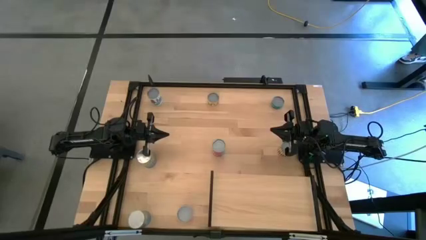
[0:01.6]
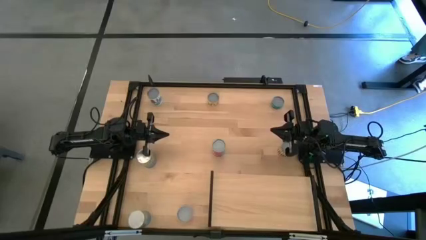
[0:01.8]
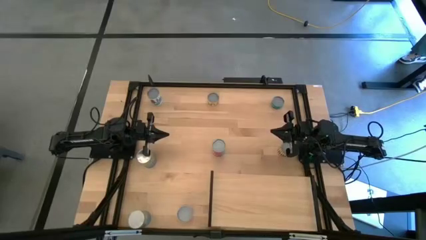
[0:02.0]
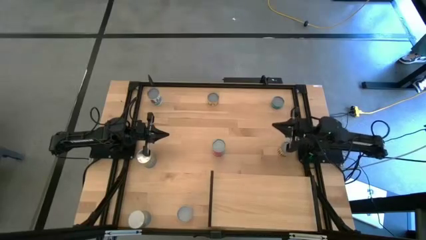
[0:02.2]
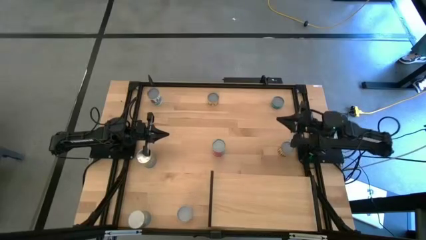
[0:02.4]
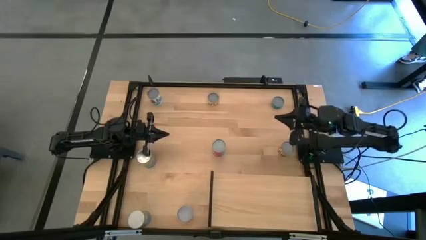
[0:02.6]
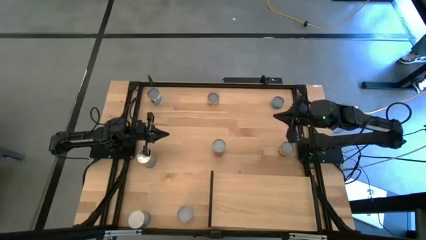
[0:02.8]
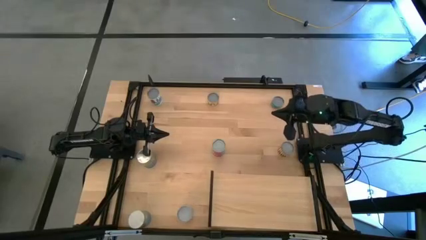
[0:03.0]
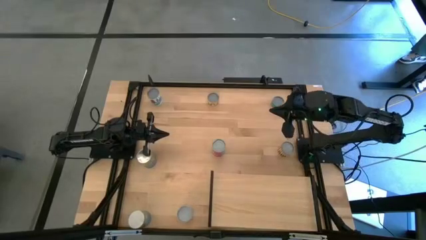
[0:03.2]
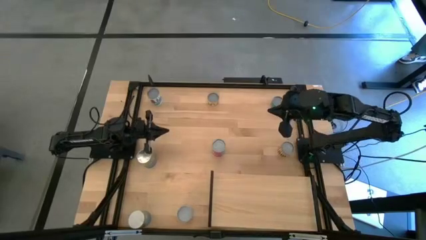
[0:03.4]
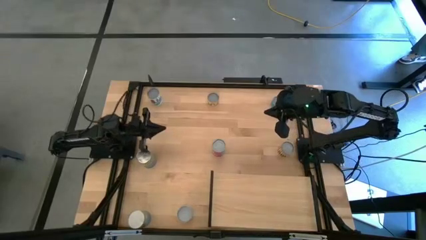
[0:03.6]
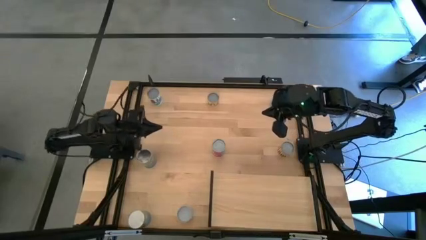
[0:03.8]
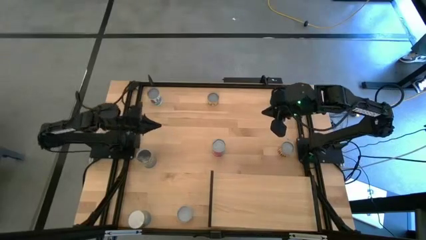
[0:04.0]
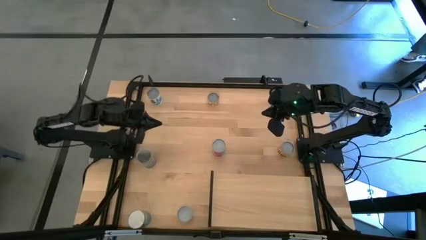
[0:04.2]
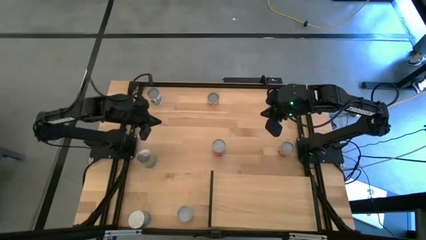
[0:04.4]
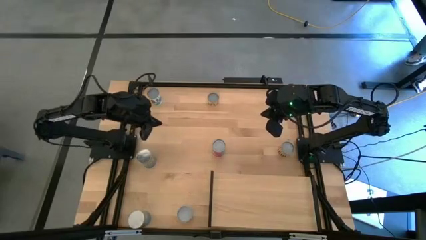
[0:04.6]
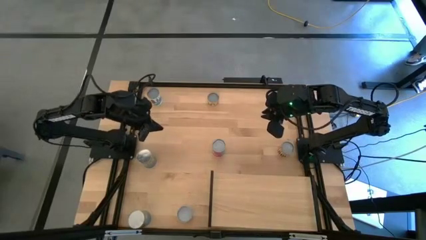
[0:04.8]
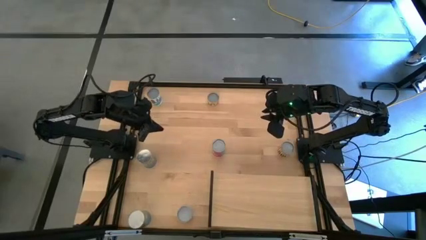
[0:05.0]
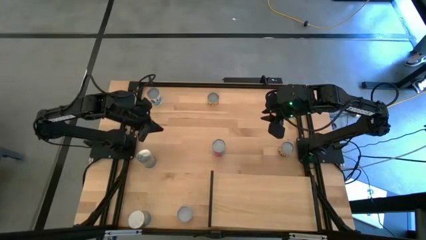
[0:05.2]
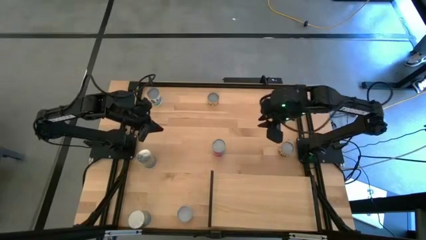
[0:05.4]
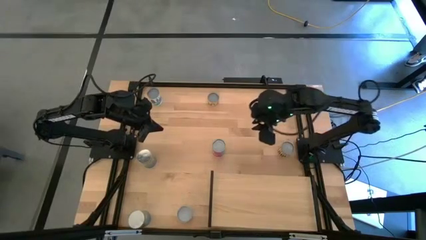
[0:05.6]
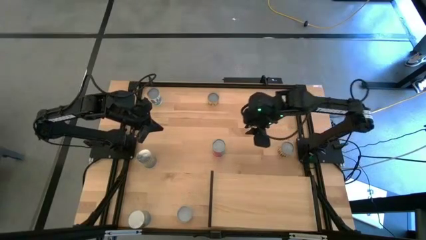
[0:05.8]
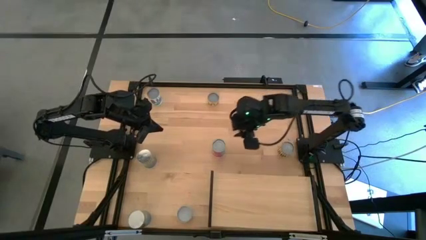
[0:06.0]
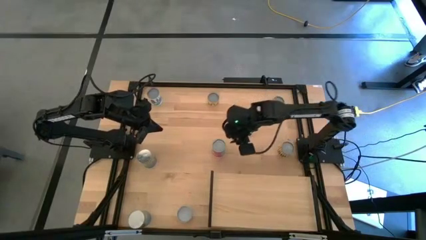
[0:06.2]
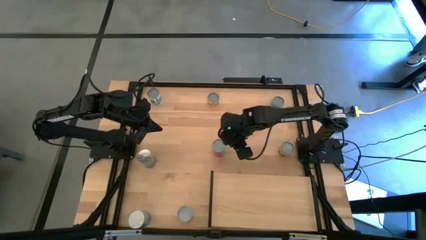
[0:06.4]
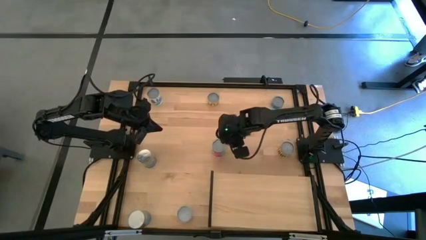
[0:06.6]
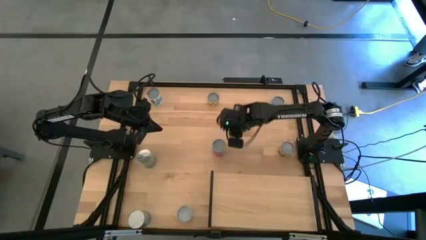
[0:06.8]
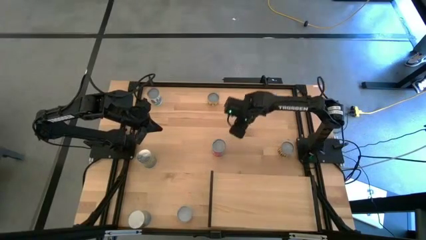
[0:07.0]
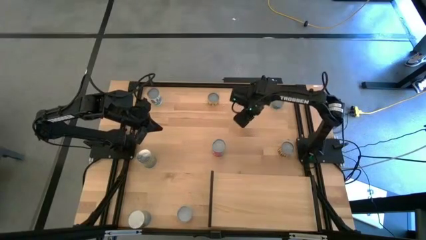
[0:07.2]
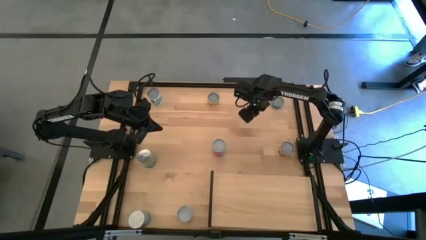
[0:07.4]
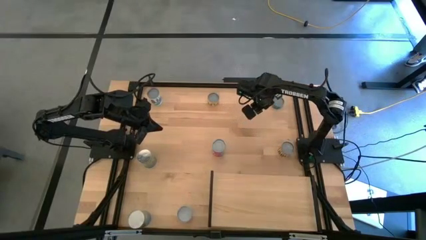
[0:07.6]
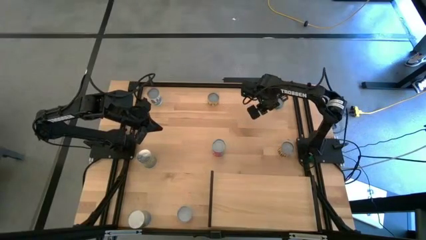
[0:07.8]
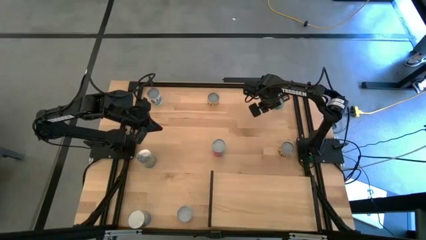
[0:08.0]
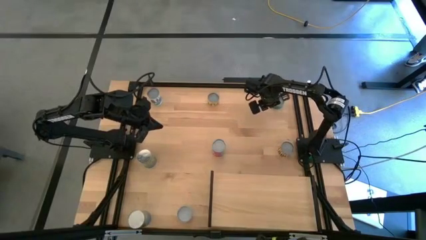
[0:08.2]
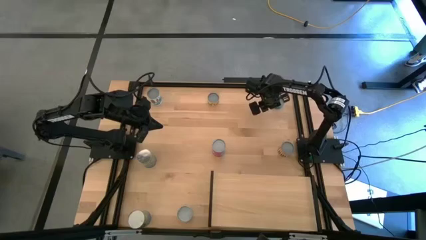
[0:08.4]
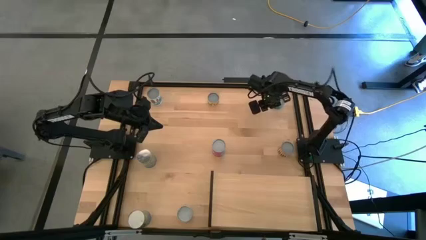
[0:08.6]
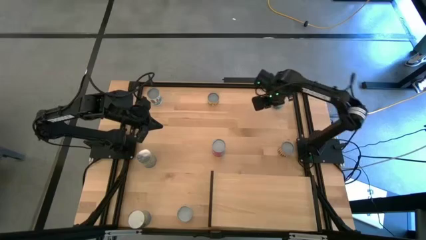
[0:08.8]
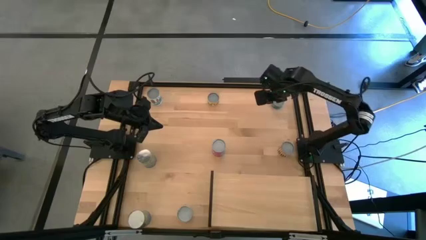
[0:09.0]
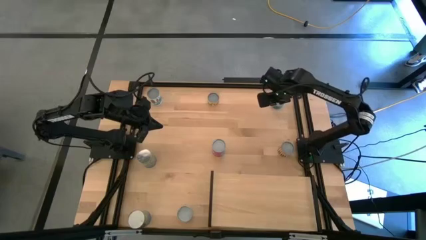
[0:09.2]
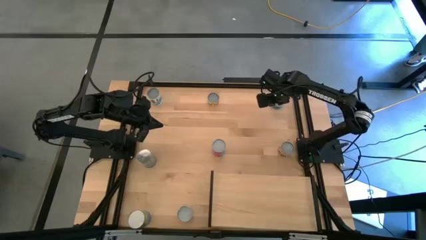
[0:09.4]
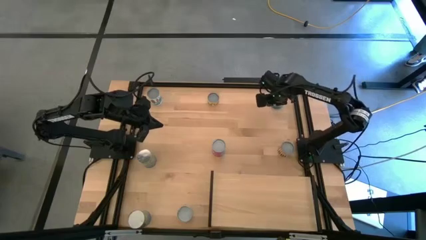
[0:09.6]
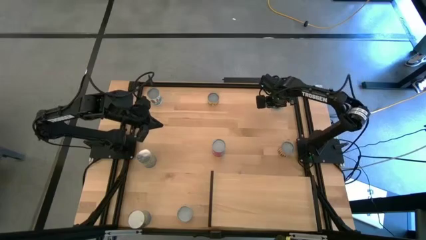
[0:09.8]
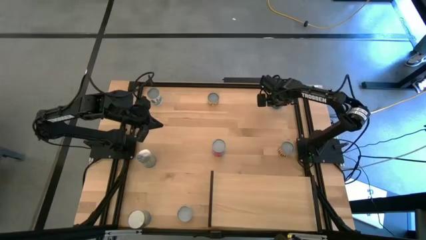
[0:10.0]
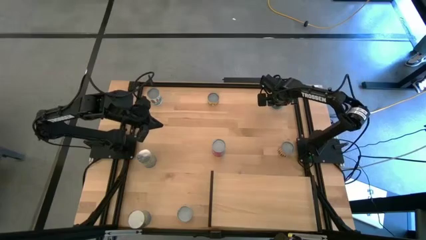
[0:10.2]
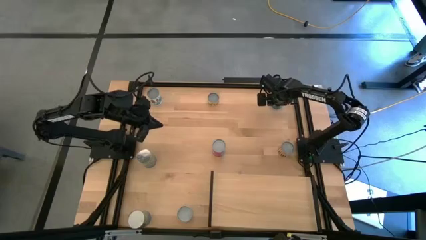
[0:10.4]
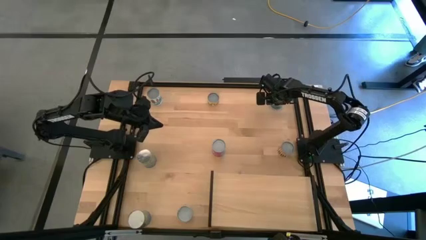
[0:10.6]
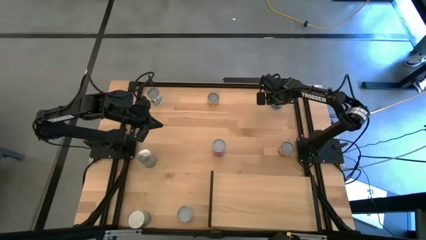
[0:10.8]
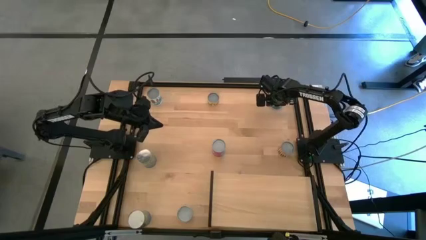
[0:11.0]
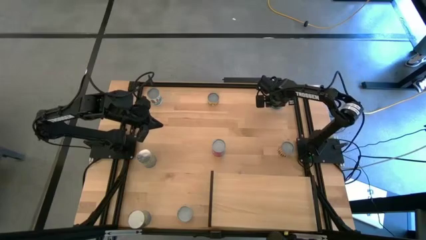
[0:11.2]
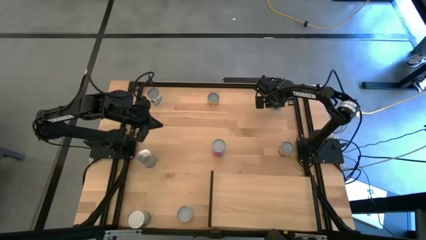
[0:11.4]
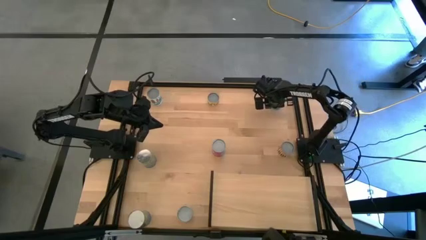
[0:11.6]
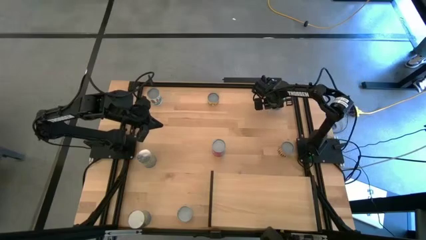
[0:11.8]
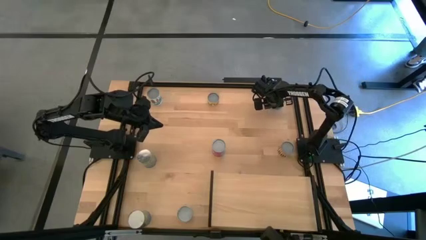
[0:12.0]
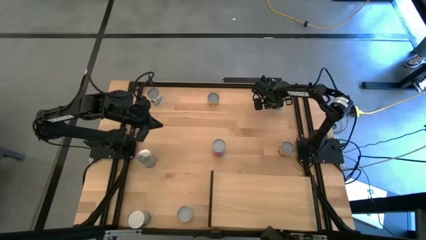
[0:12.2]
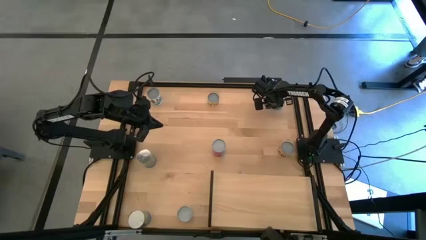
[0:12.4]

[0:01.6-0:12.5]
Task: Pick and place cans onto a shelf
Put the canned tuna on the shelf
